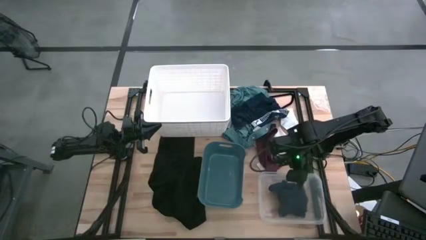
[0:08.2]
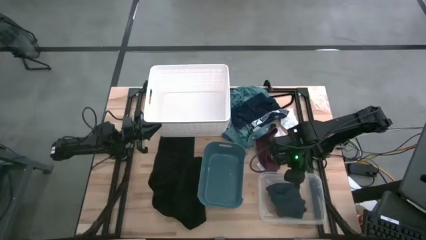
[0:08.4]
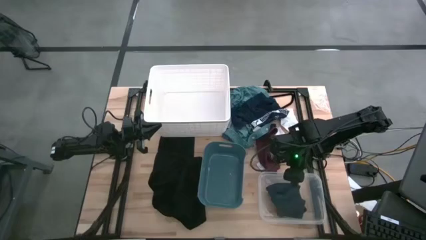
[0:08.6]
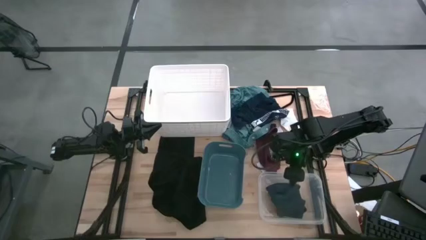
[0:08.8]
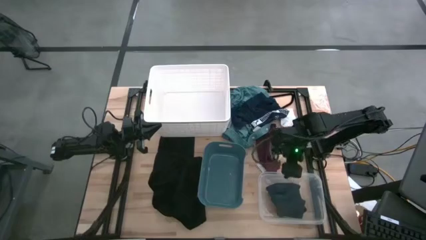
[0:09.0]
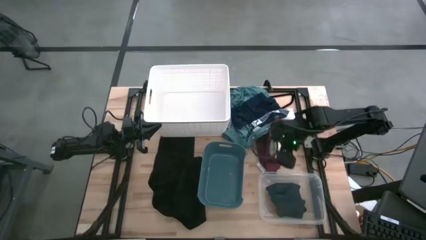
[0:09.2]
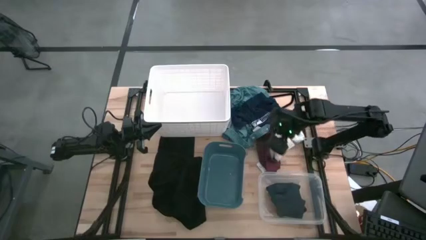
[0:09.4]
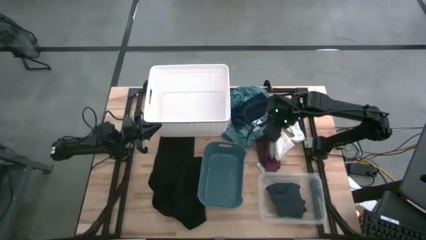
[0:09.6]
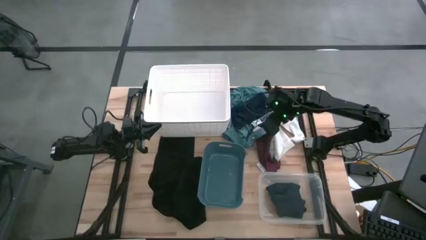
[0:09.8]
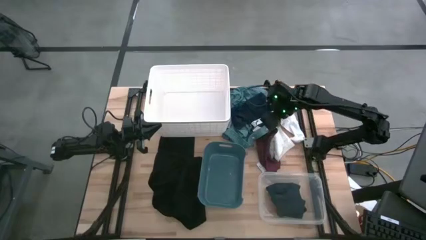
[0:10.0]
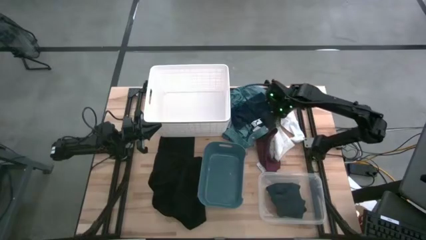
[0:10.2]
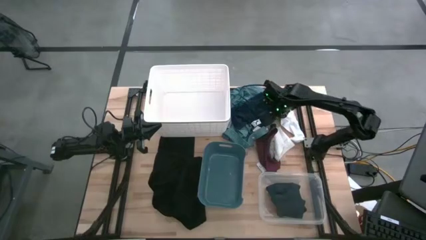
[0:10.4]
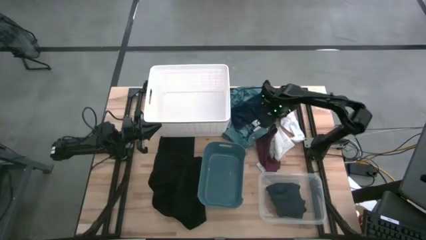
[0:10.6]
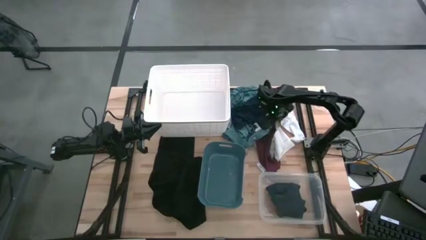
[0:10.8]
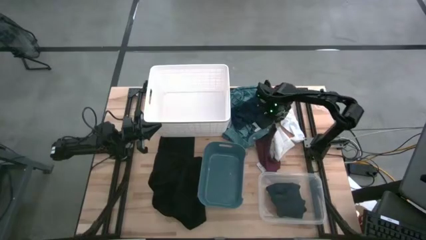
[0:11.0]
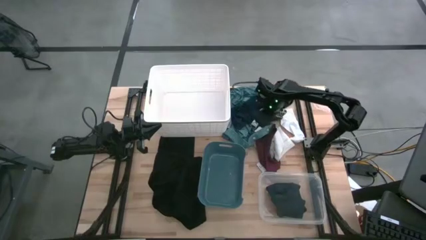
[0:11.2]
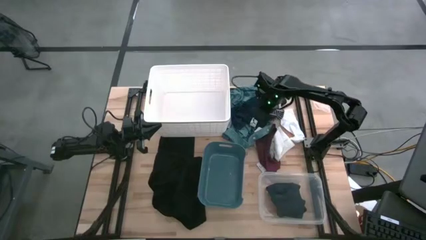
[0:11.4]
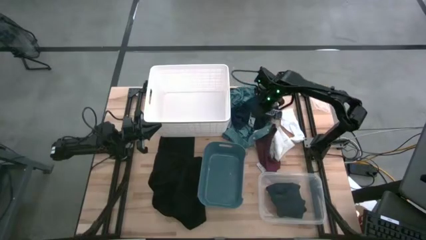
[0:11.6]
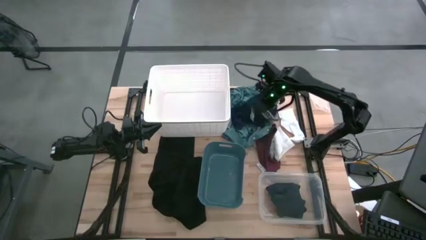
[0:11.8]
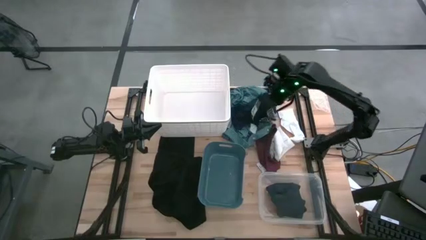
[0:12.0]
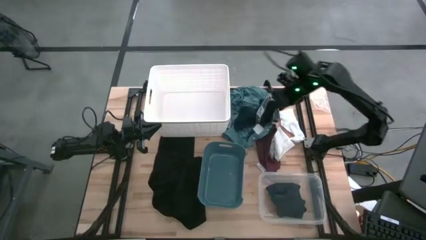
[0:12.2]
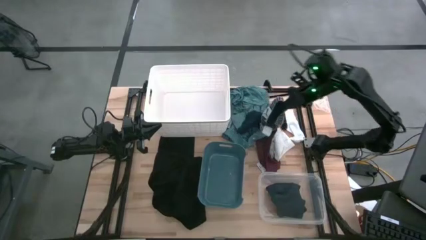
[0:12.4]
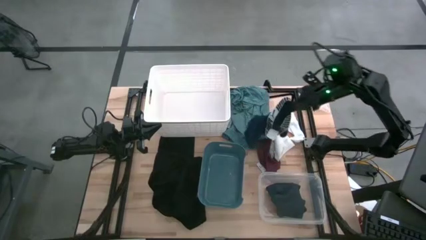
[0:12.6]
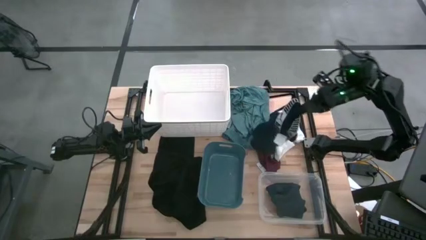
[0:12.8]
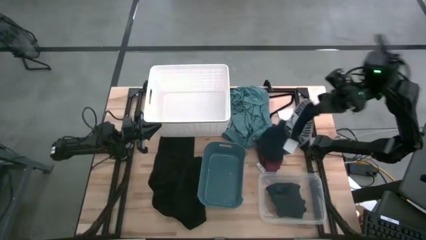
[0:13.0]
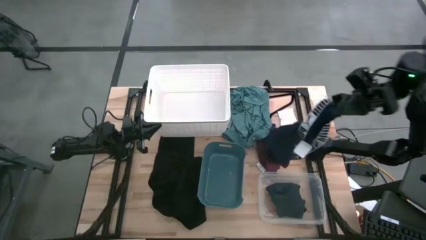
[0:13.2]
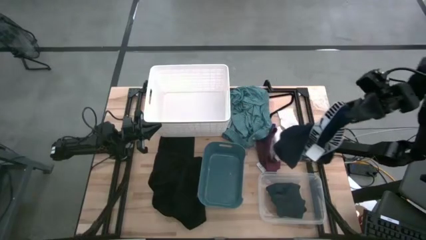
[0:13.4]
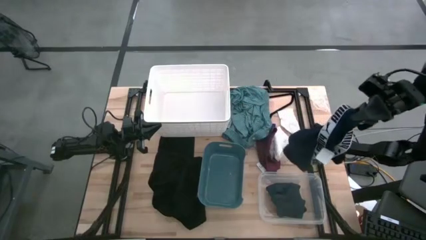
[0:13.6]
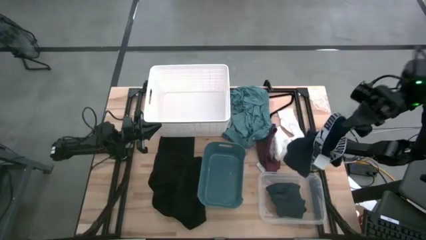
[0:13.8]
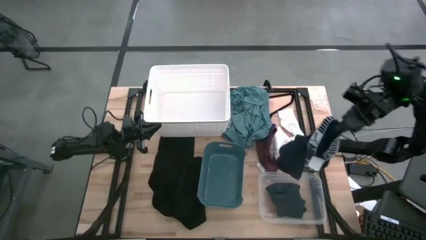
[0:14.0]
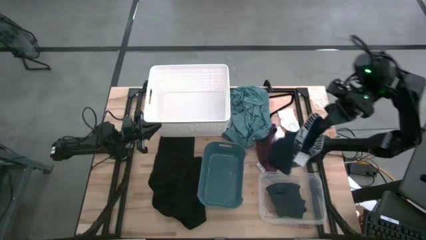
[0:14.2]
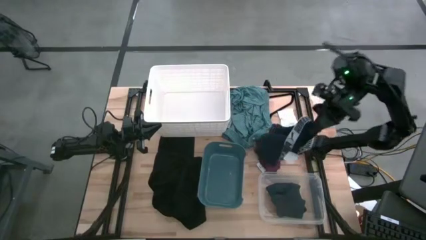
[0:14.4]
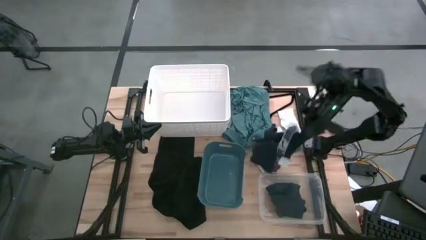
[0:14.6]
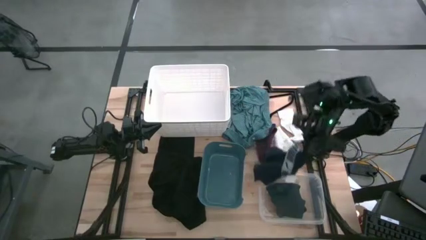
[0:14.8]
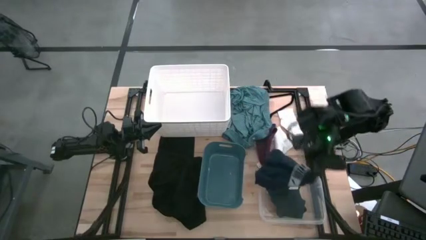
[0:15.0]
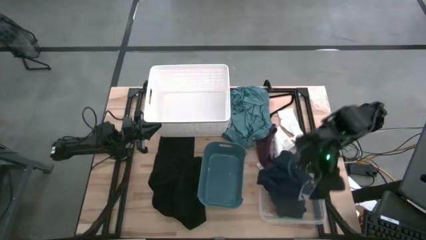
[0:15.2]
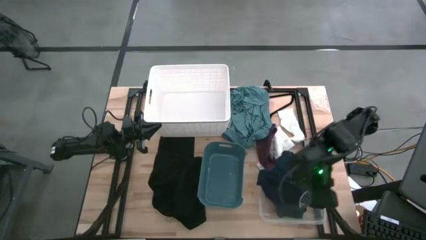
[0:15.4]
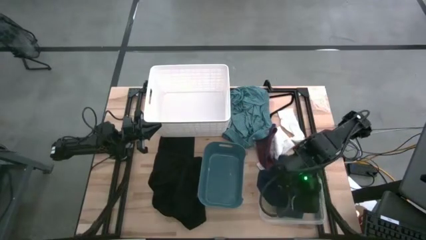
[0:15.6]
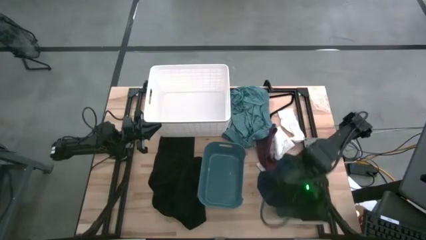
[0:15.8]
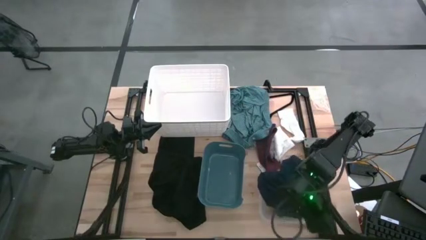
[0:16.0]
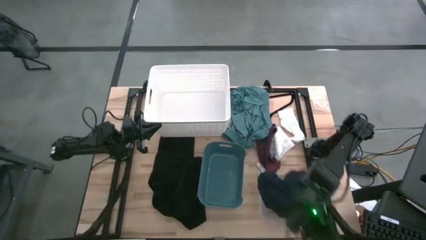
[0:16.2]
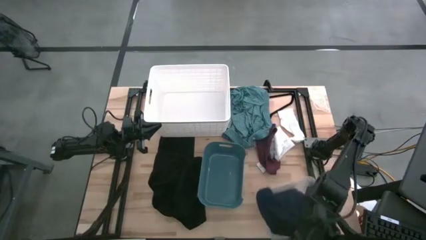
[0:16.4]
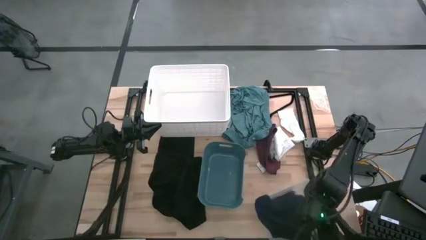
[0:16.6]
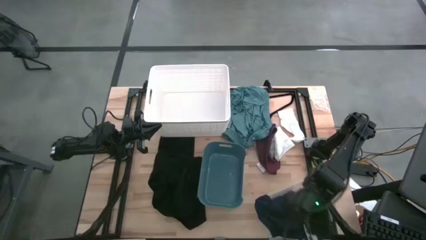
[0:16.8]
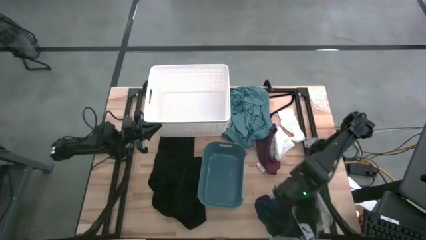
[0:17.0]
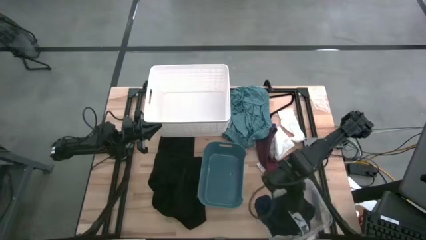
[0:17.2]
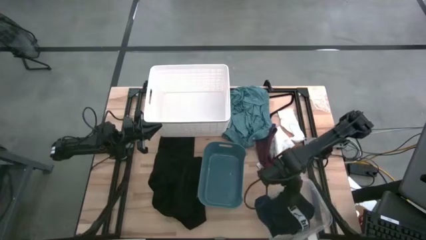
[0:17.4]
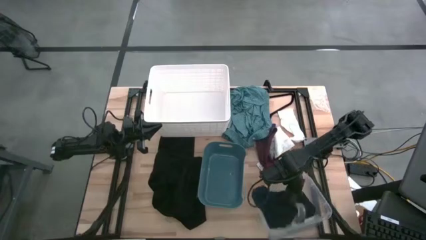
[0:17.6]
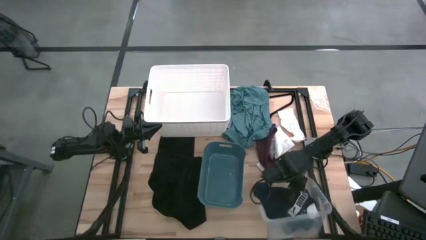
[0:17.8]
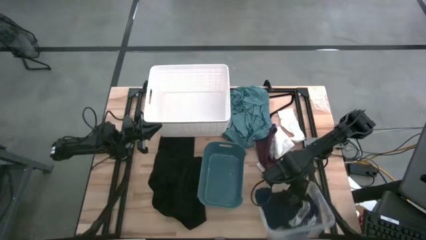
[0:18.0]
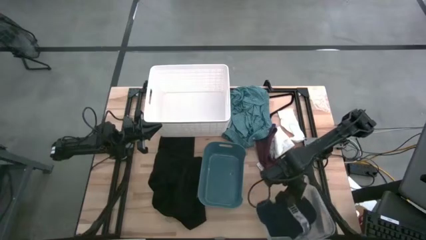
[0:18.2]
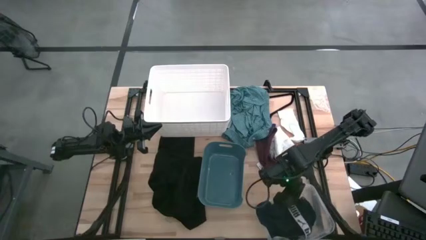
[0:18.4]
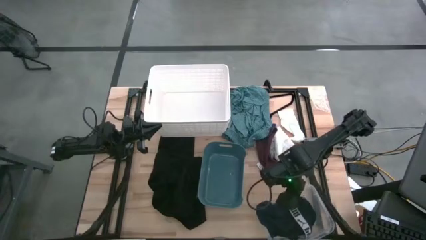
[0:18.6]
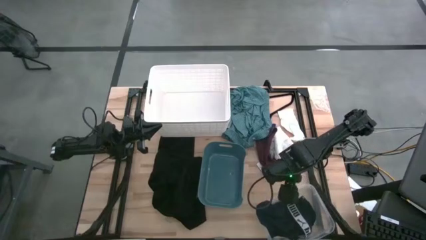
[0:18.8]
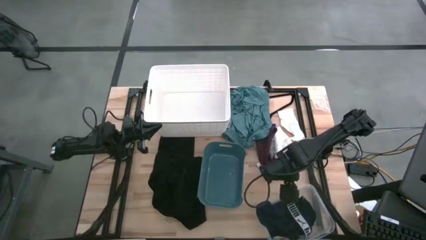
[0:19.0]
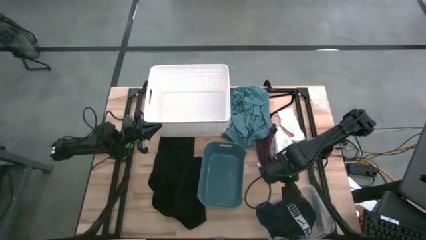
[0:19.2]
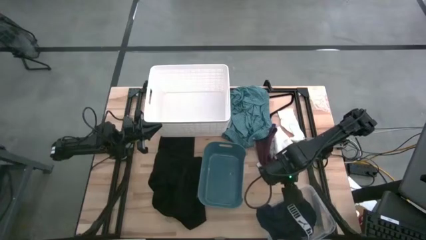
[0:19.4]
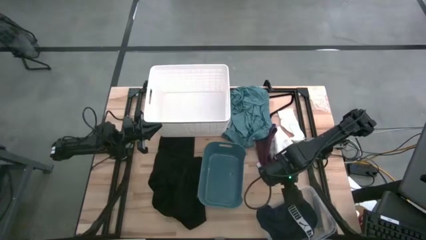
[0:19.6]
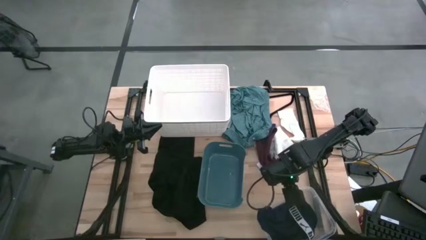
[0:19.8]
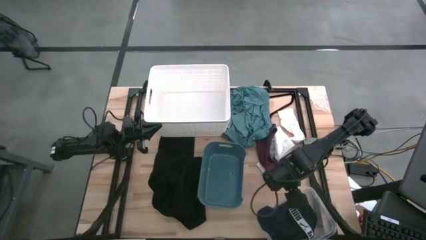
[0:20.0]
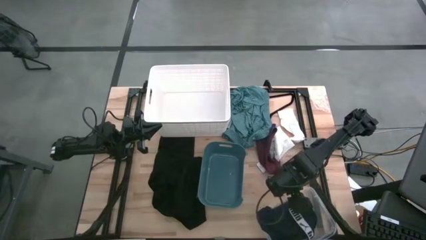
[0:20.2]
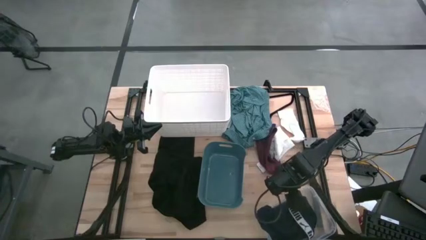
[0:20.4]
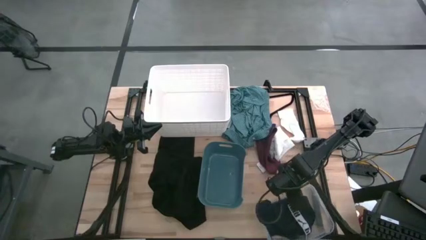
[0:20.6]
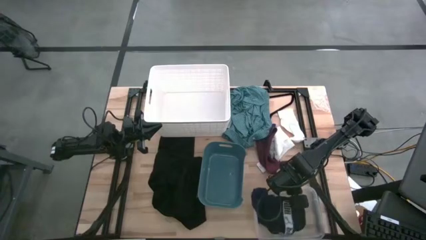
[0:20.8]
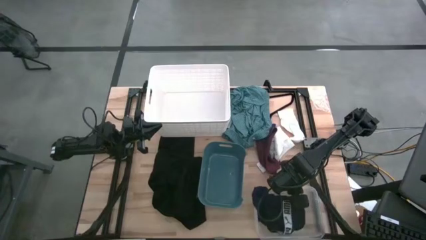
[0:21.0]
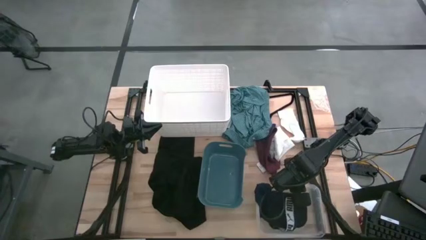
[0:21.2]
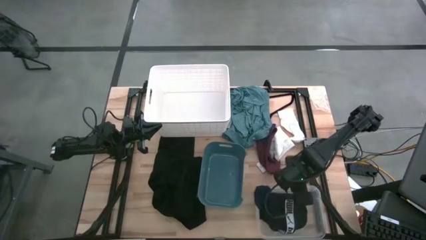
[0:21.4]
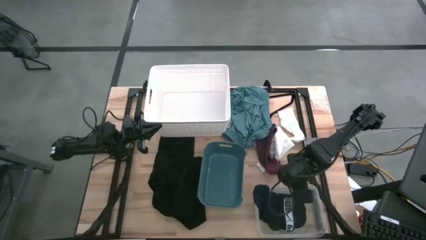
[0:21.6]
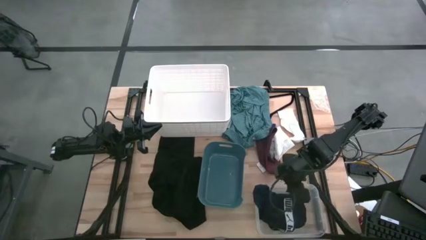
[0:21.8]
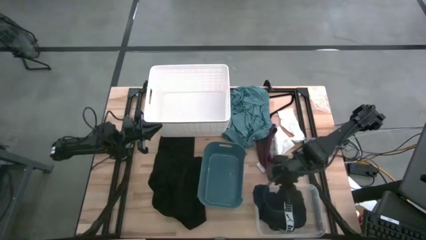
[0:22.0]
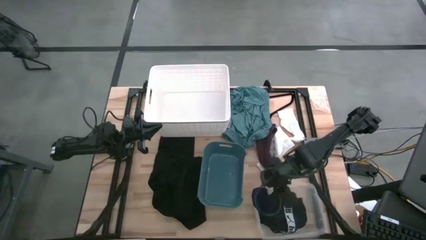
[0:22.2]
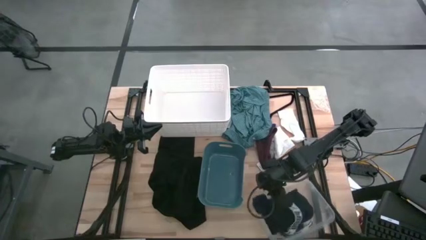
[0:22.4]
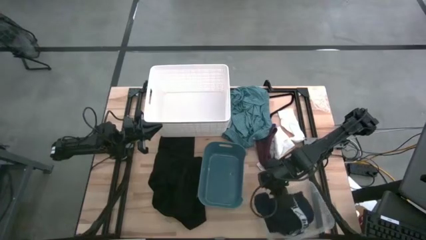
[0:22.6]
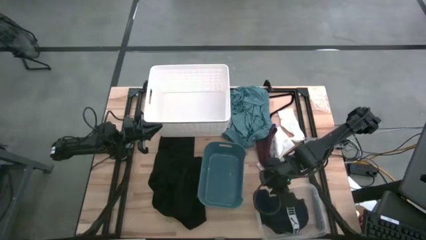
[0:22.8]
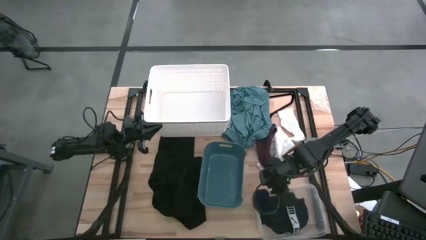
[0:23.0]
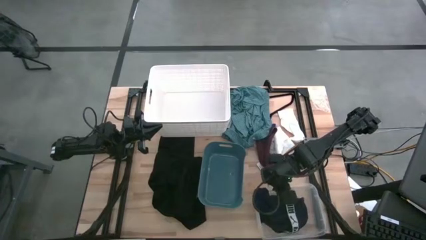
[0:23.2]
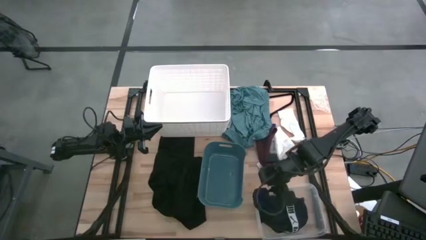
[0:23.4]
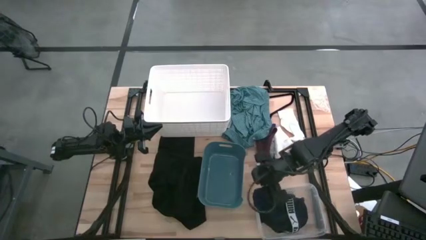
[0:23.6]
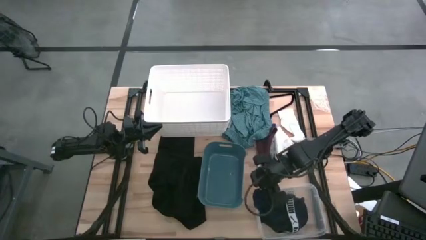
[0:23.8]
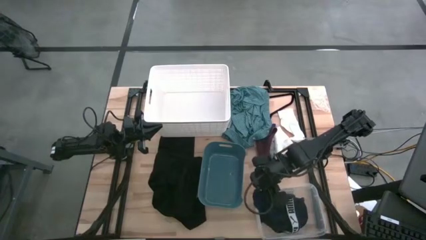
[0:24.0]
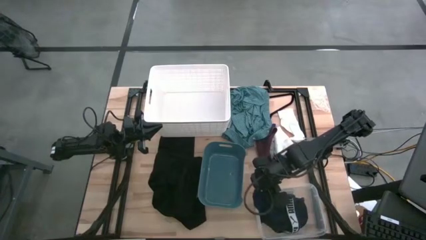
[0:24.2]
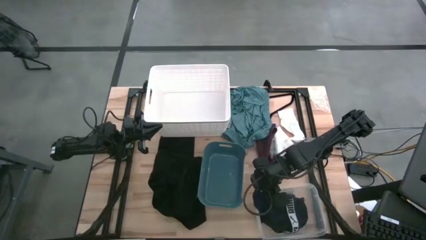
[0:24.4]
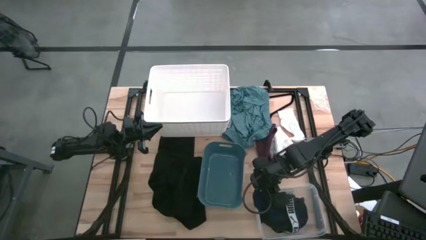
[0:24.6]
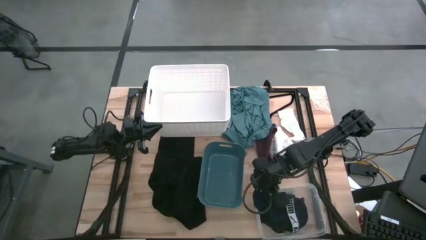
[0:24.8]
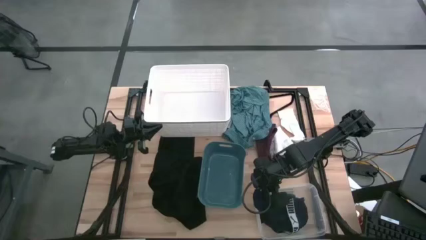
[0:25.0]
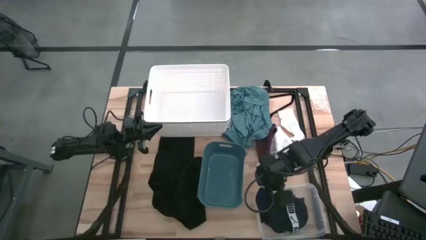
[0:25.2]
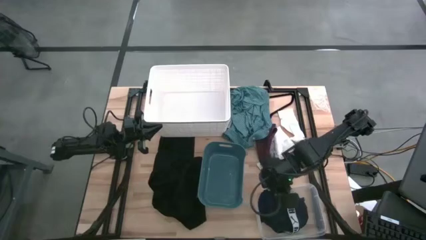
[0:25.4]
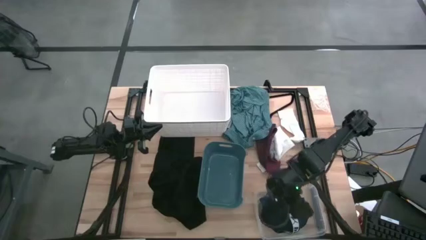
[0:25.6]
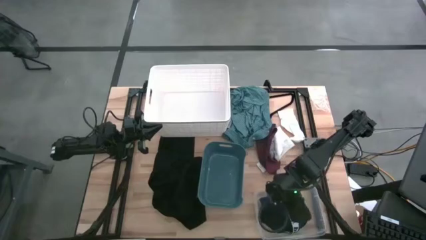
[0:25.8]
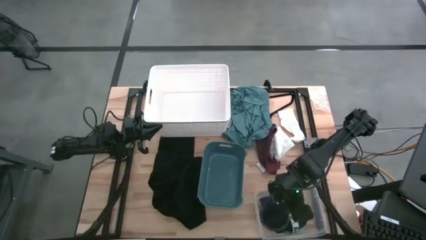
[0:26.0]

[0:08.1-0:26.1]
Task: Pick & Place Cloths
Put the blue boxers into the transparent bin
